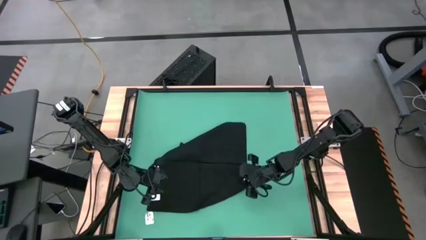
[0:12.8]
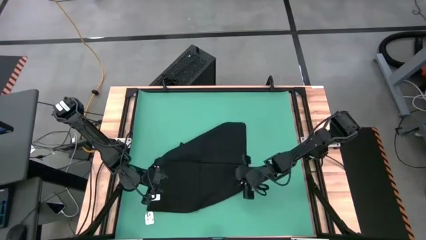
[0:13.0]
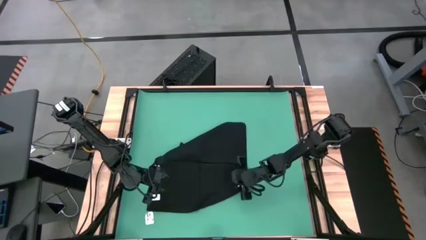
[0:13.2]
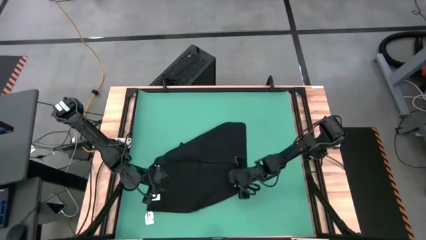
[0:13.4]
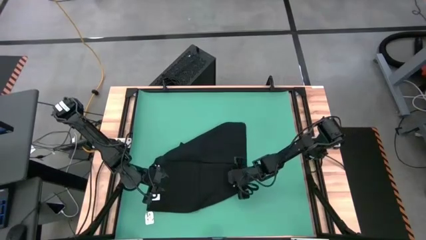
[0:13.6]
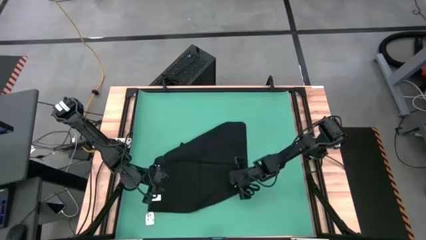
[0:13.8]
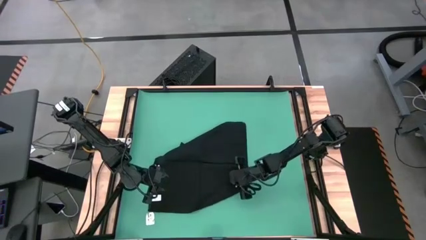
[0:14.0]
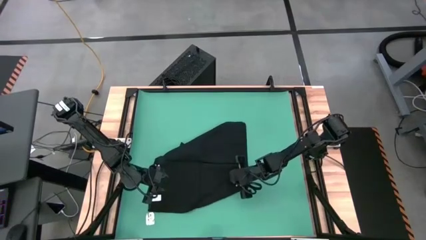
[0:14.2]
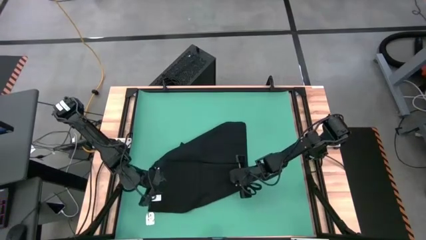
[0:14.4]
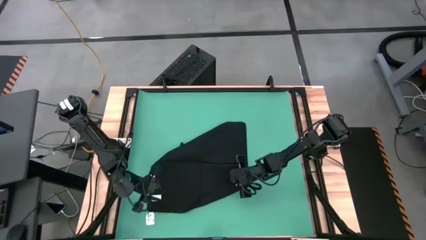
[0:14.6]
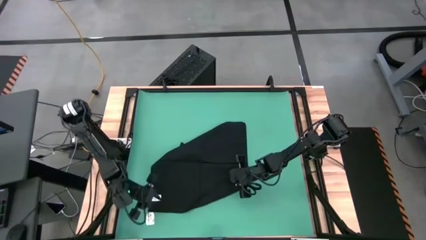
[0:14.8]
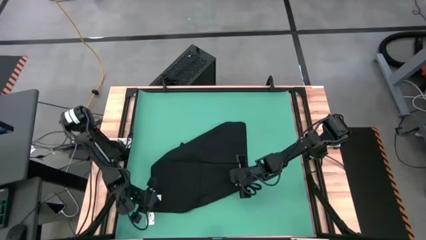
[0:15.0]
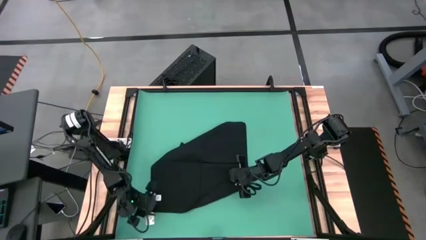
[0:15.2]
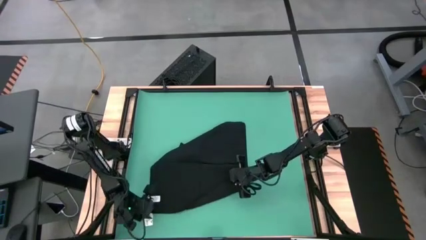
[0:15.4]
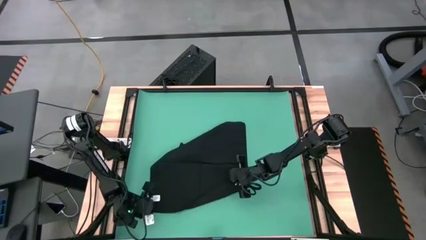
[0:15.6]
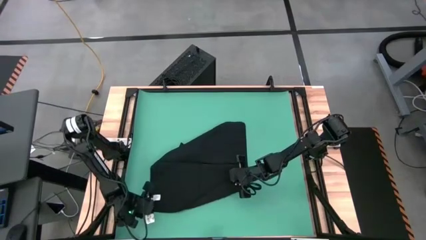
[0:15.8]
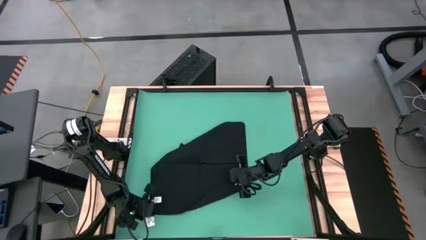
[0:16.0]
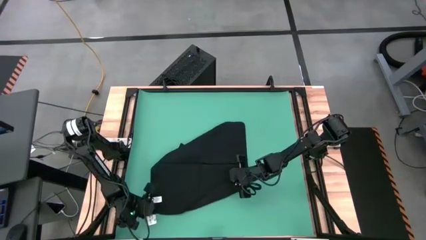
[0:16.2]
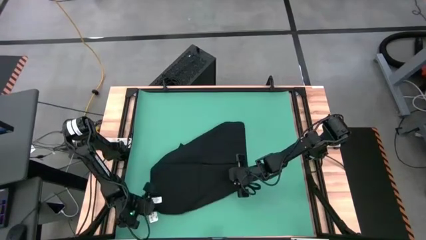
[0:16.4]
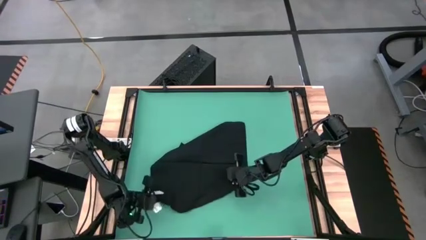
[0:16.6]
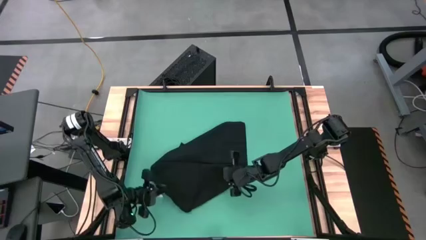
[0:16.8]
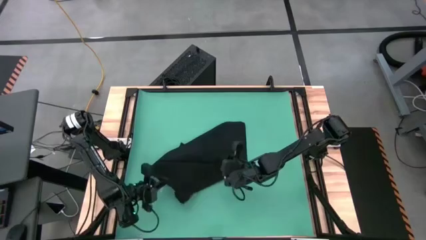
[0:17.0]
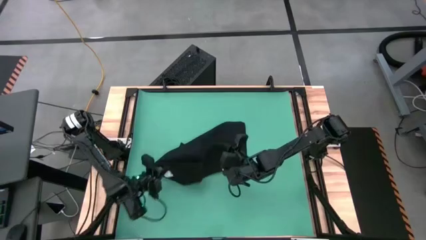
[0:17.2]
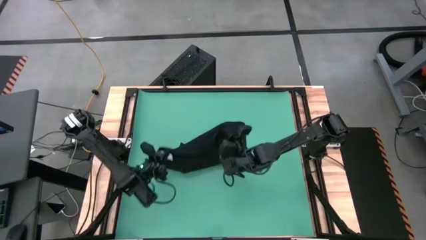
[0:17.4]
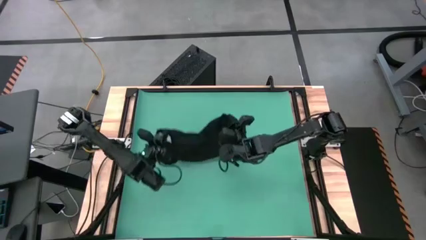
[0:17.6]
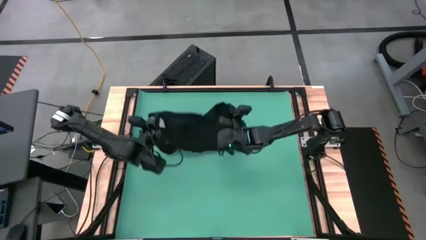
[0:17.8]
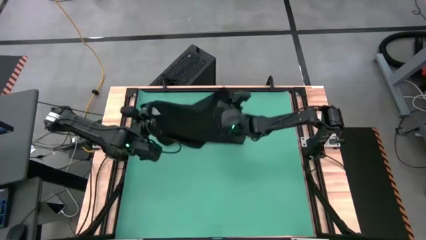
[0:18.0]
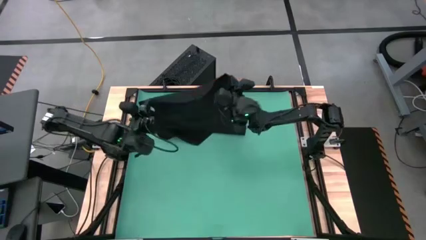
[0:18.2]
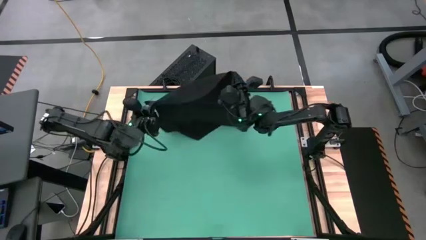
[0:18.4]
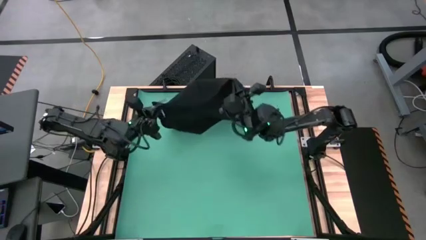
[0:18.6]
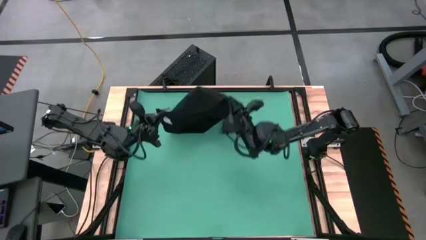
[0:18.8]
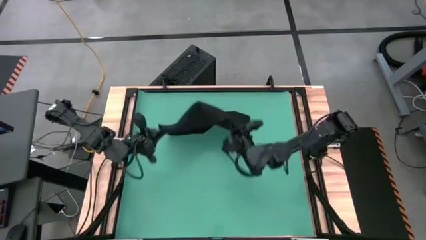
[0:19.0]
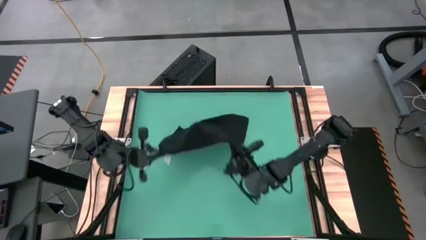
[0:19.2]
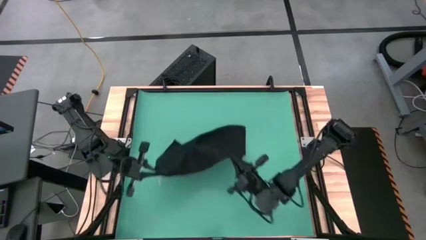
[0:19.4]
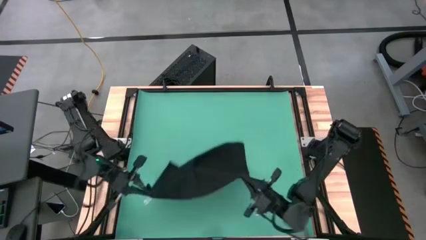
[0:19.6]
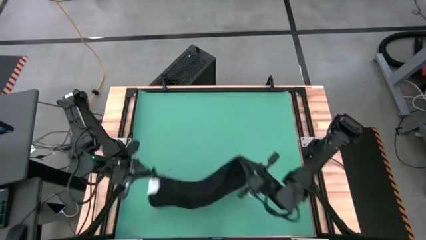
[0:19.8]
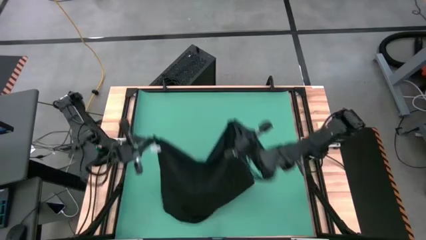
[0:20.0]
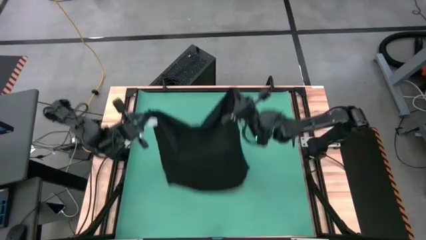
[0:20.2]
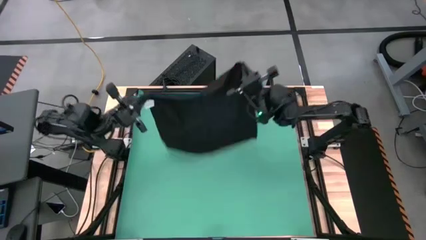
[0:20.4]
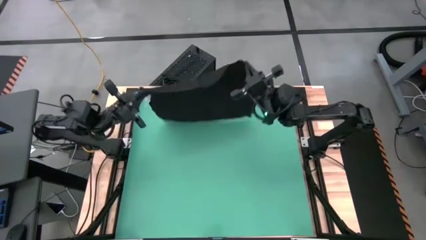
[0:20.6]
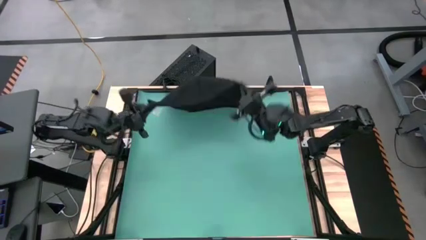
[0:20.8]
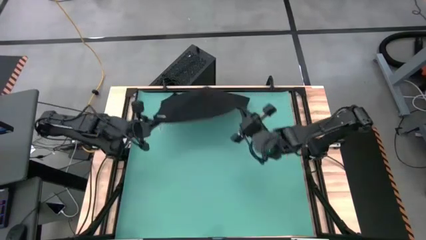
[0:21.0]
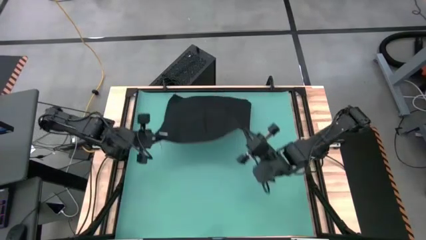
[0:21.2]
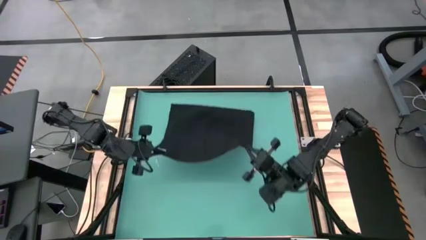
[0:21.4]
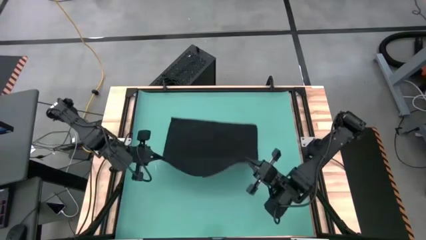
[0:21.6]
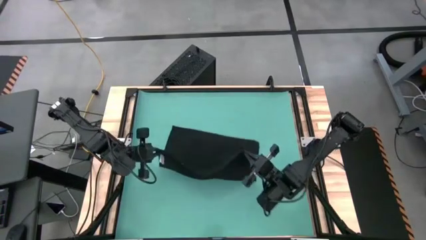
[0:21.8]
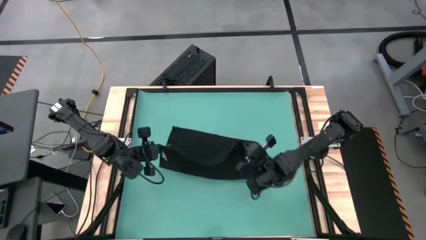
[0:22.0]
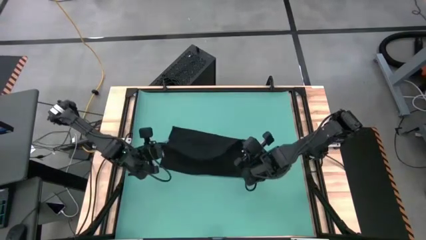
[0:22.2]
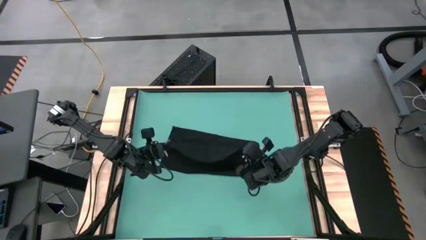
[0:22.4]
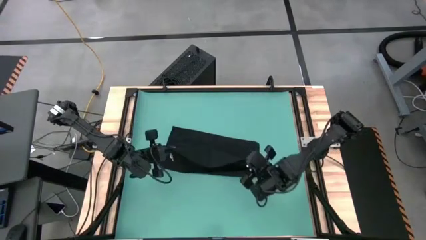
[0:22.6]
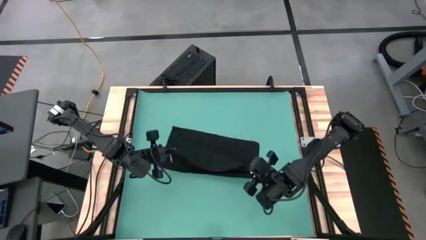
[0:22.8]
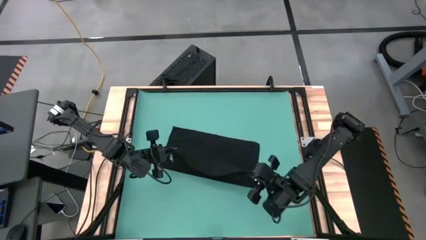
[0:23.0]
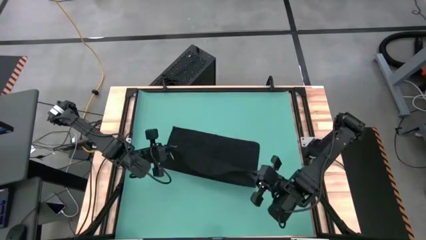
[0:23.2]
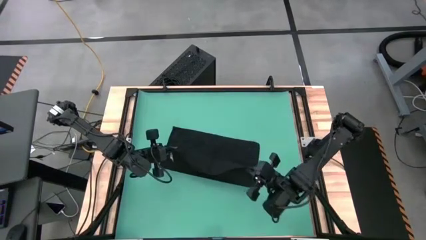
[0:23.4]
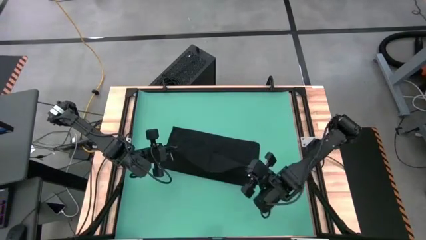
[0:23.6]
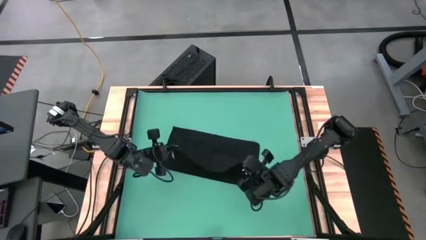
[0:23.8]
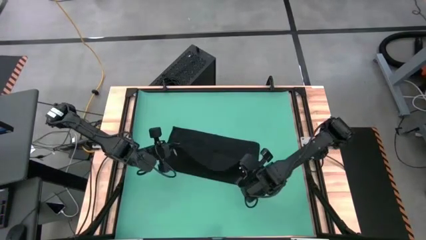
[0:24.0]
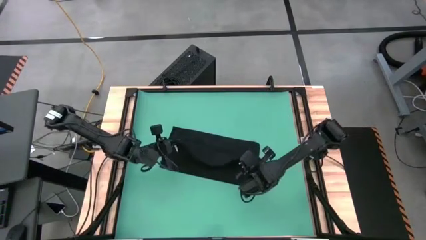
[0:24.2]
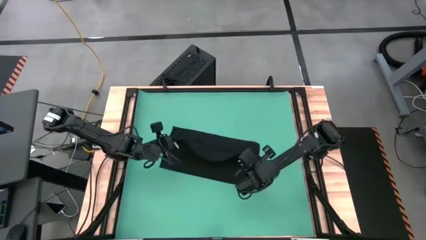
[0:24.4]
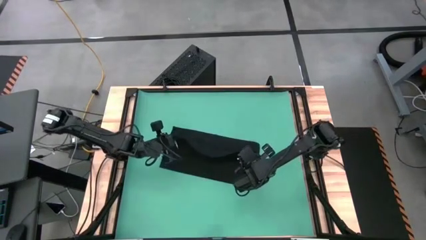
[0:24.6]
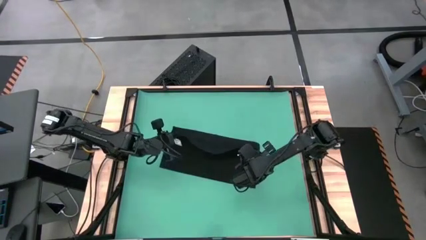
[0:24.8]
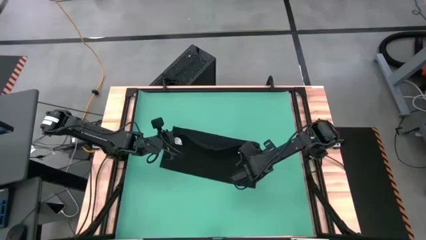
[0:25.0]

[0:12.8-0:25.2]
Task: Roll napkin
Fold the black table napkin
